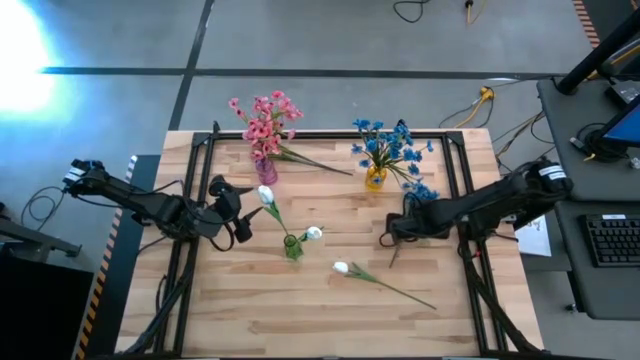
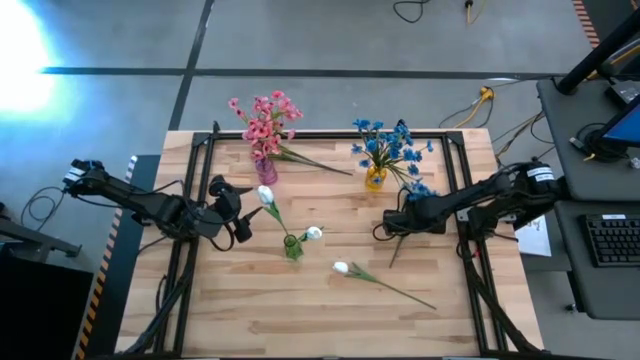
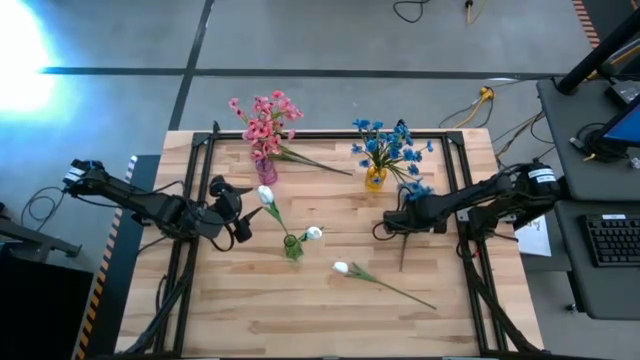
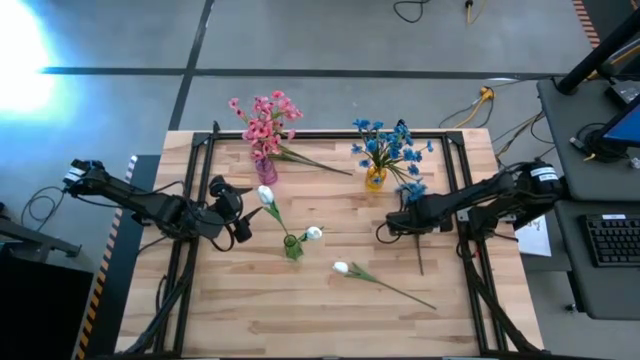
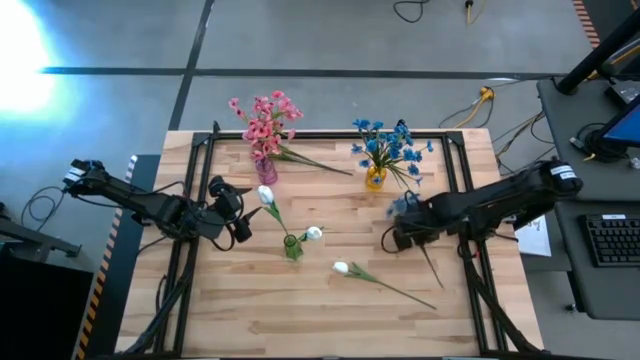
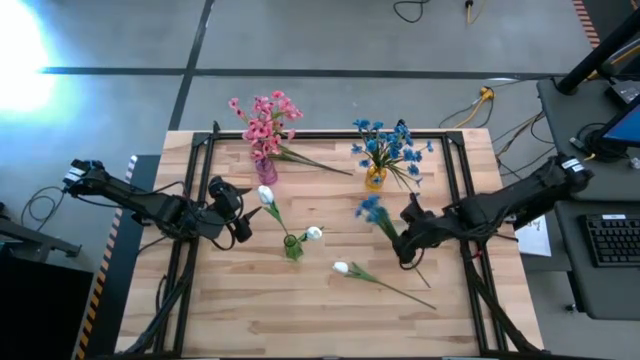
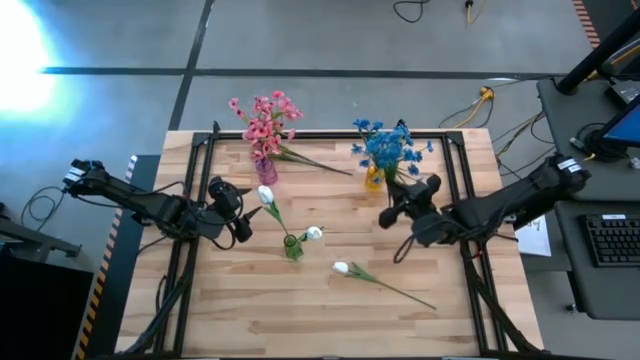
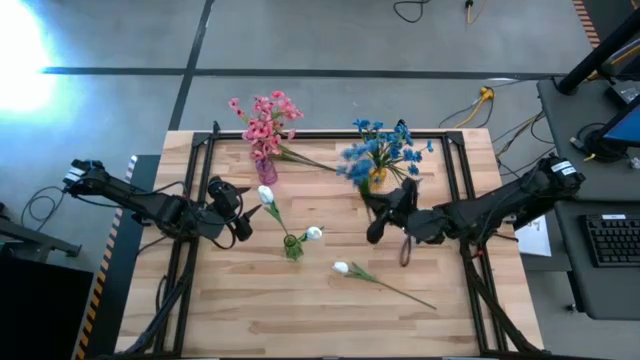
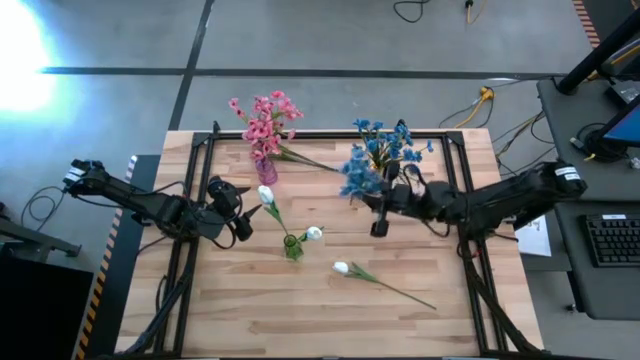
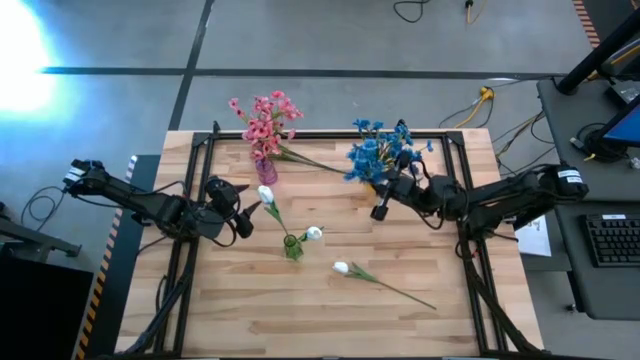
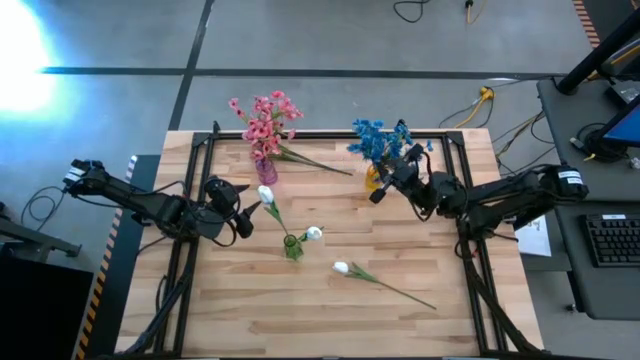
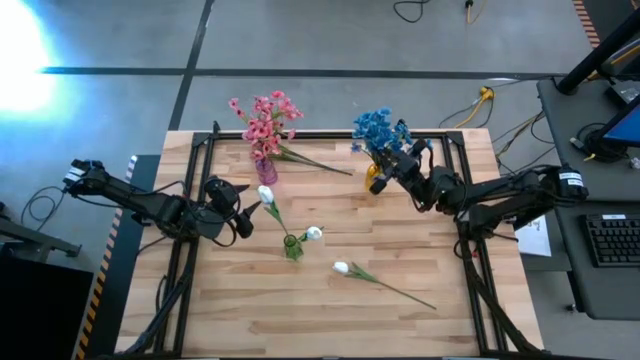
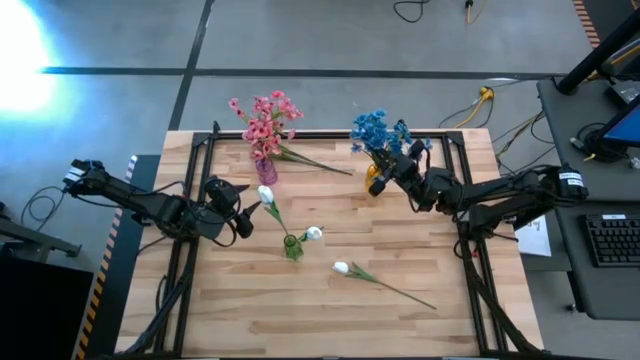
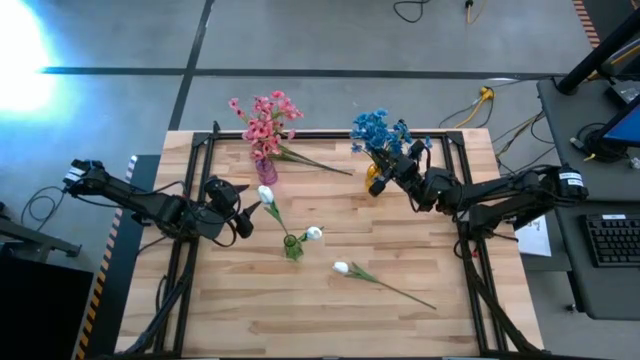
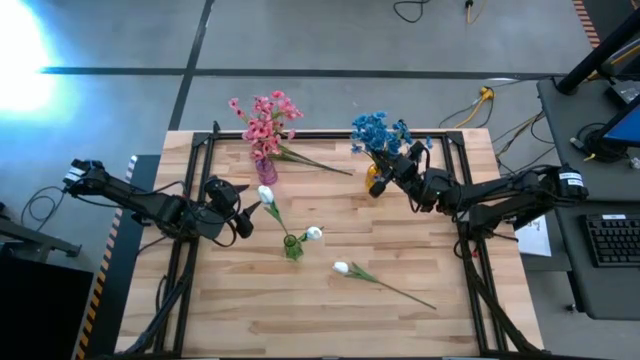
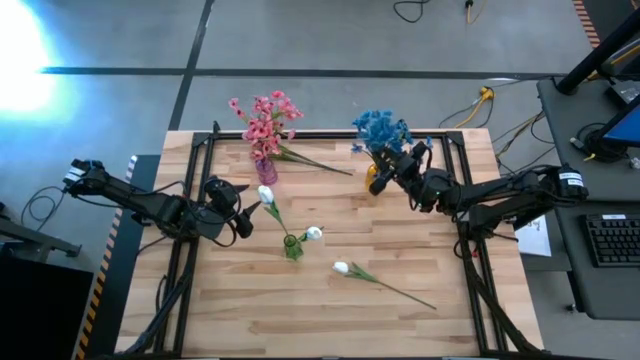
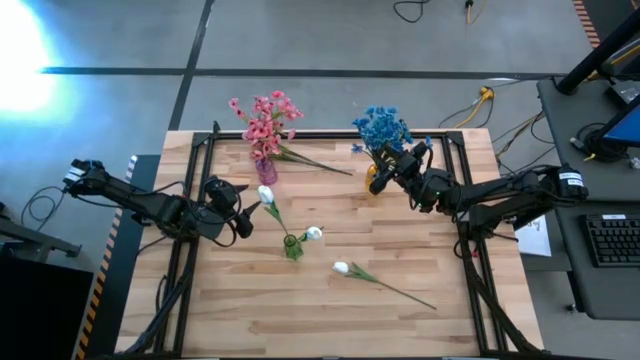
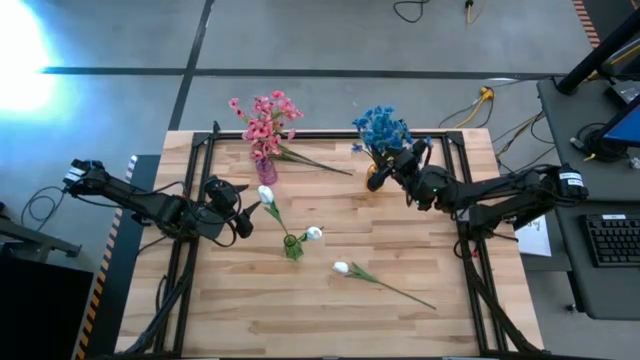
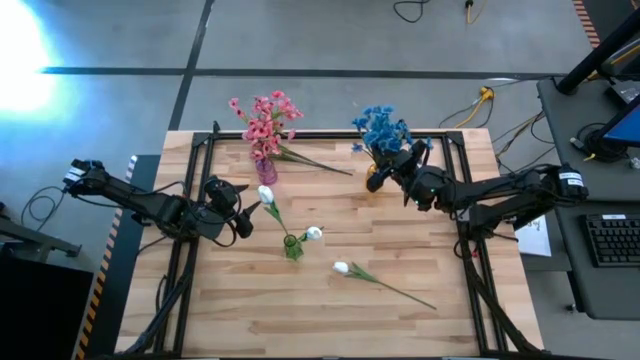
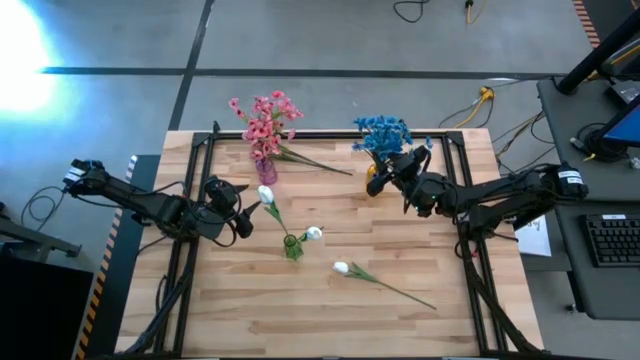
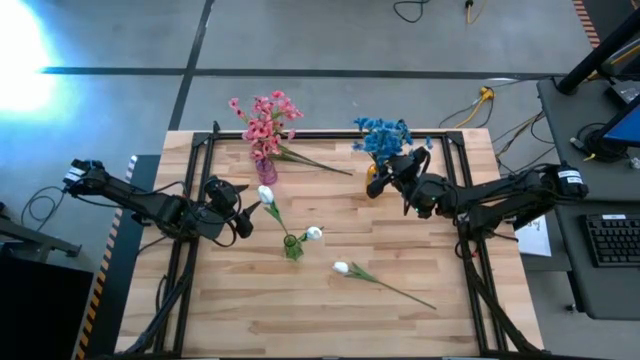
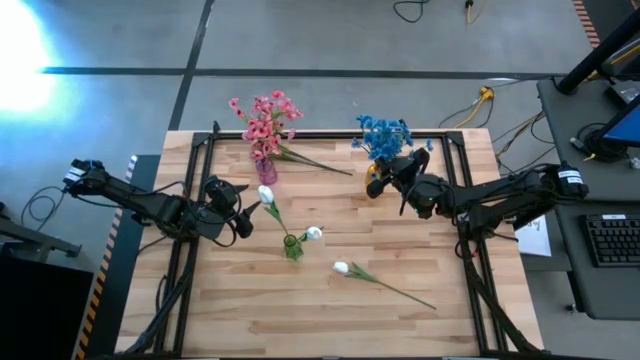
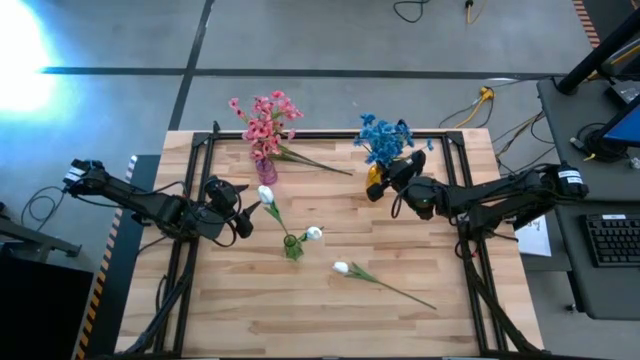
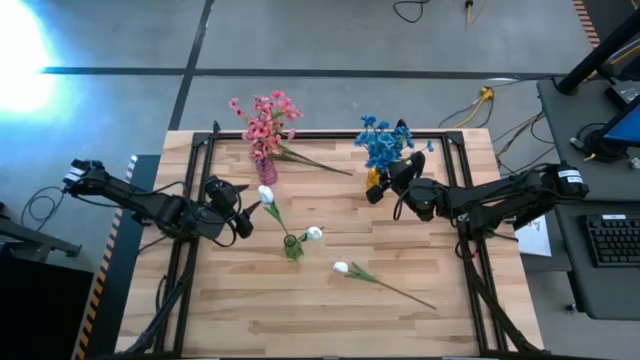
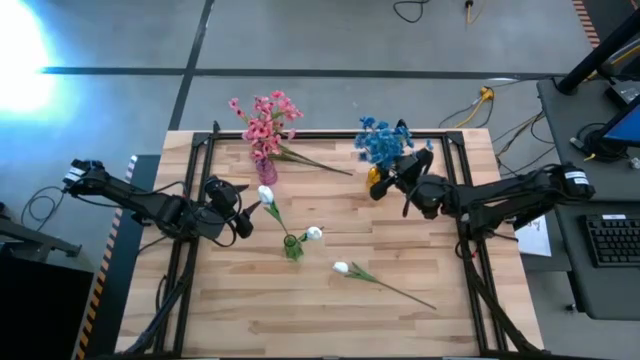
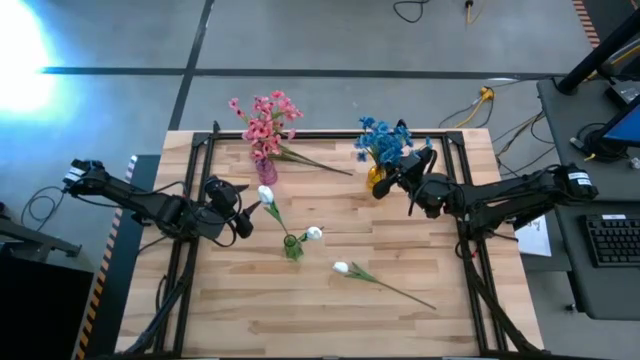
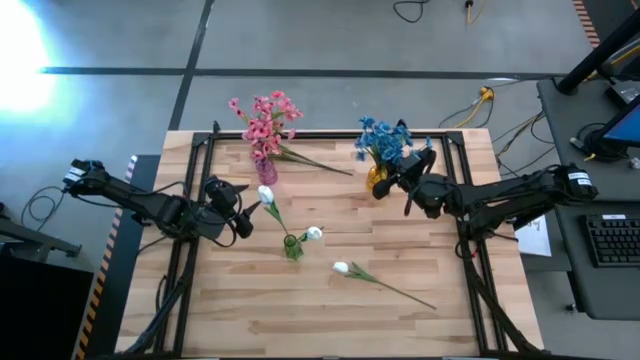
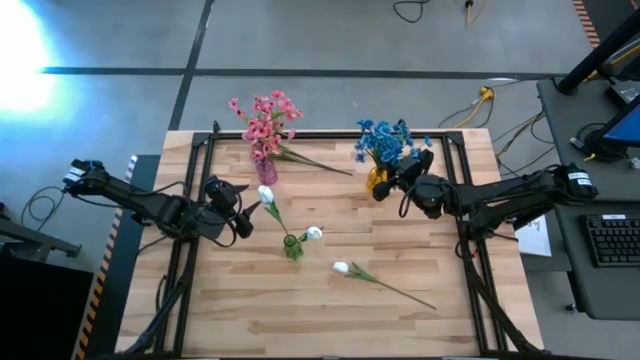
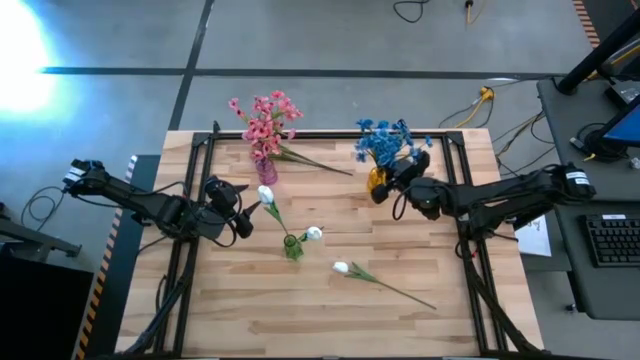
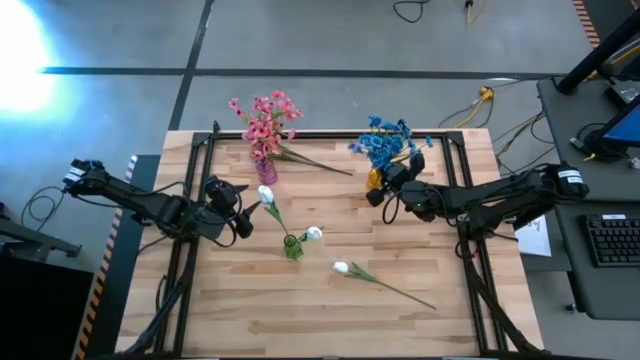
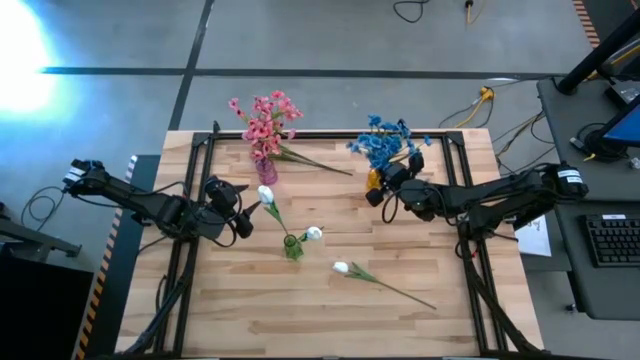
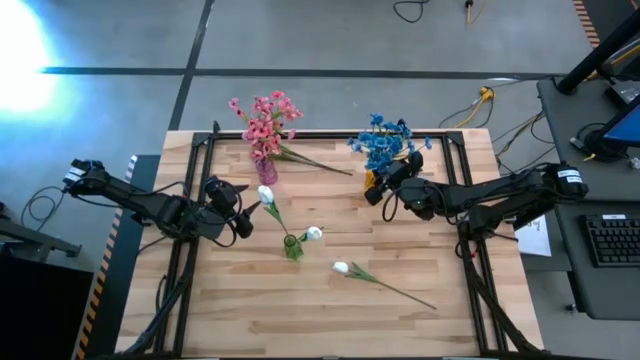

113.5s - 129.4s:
Task: Sort flowers into vase by color
Put the blue flower into the yellow vase

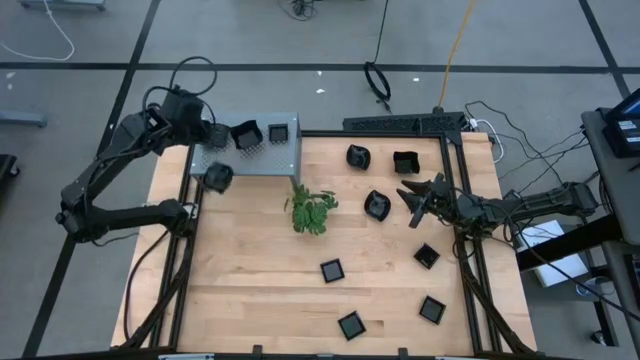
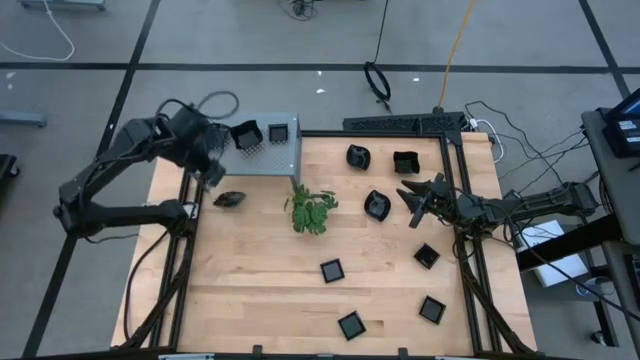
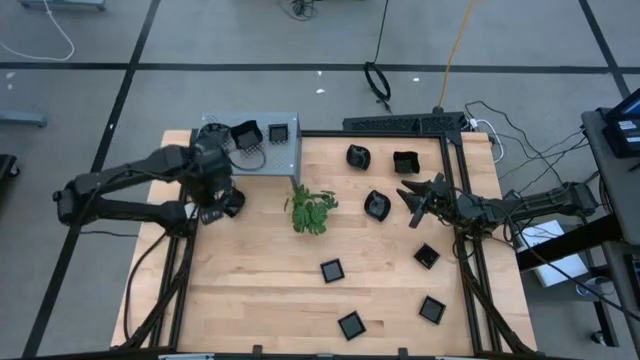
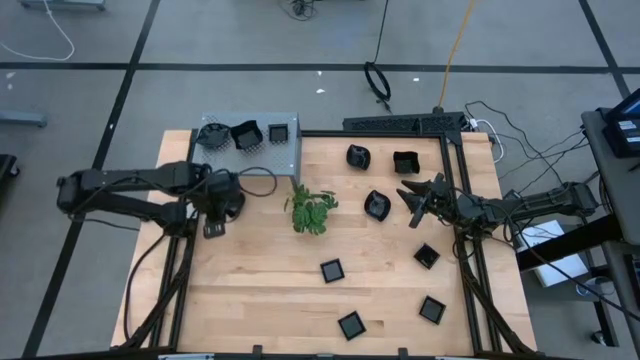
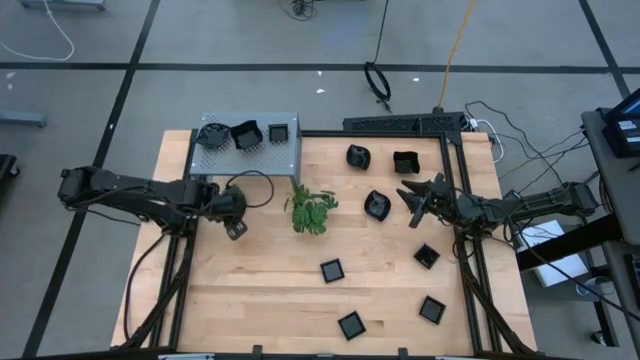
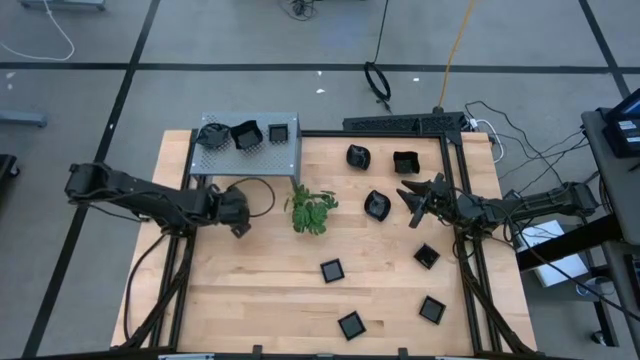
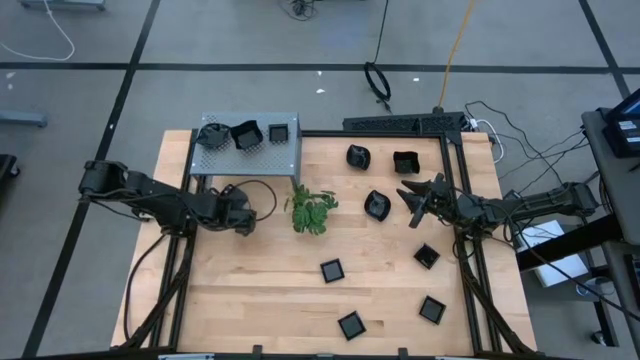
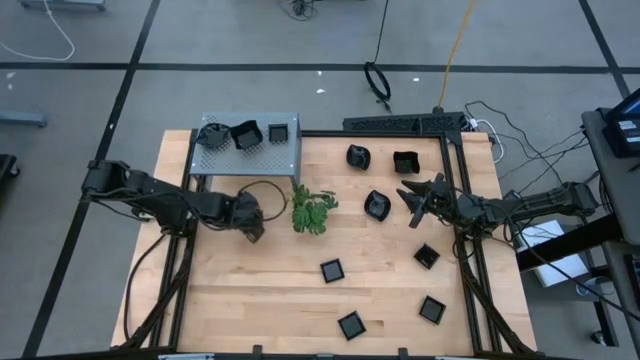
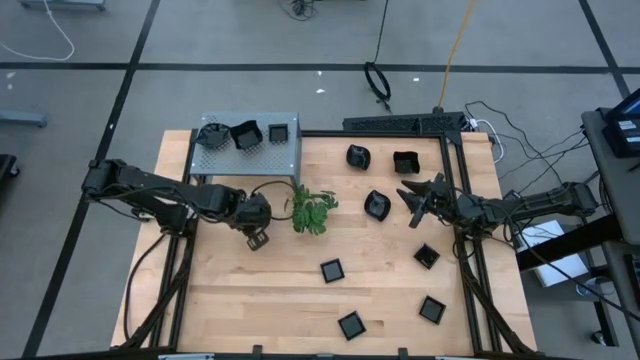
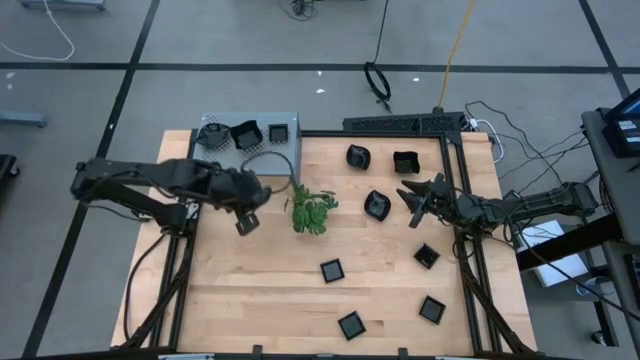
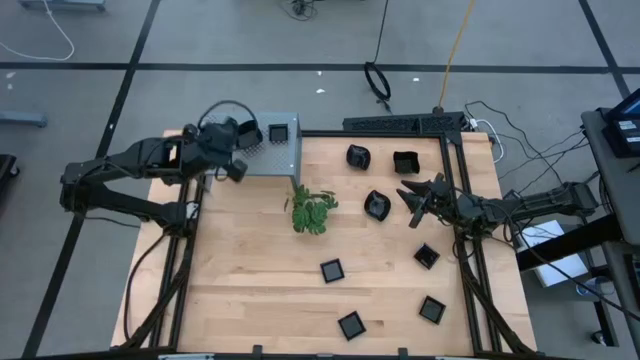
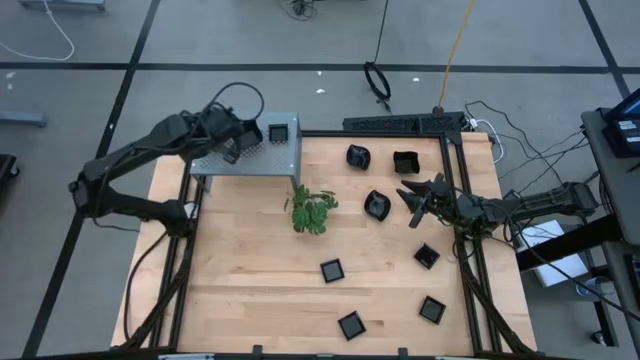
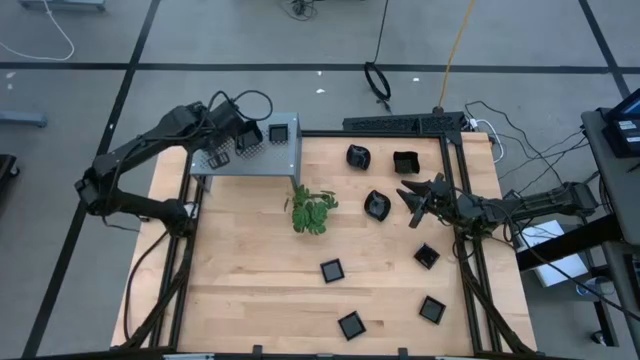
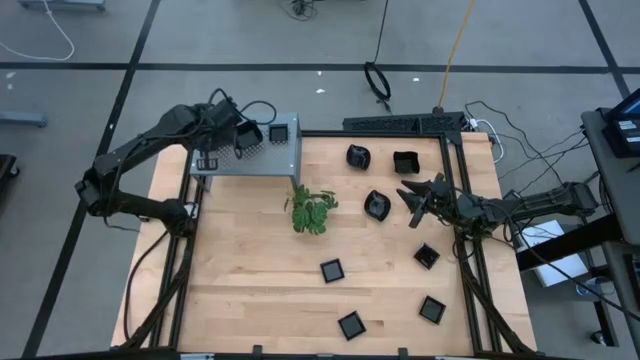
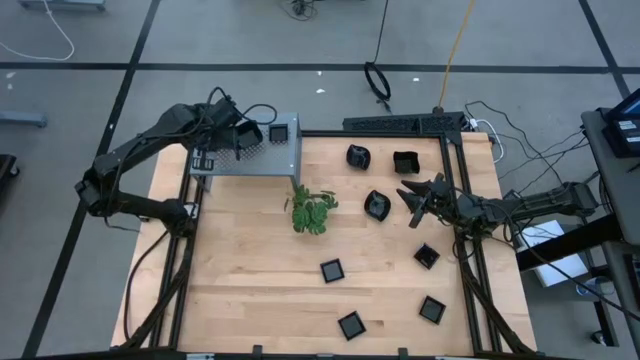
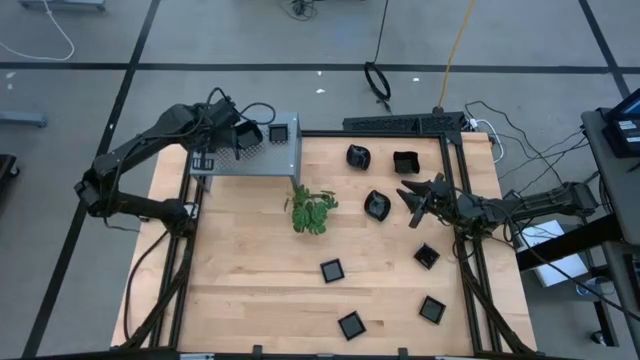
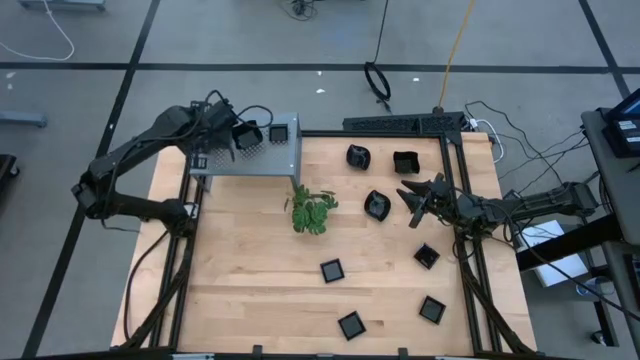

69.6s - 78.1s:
Task: Pick & Place Mini shaped plates
Stack the leaf shaped plate on top of the leaf shaped plate on the shelf
